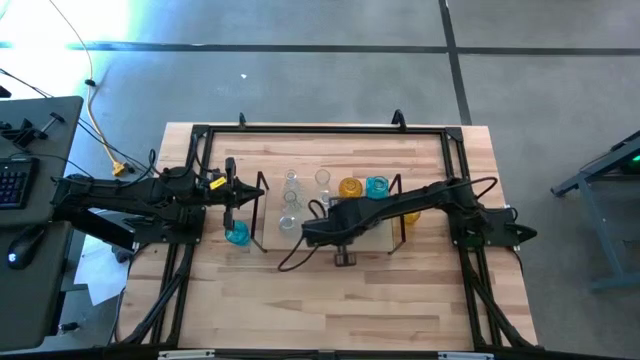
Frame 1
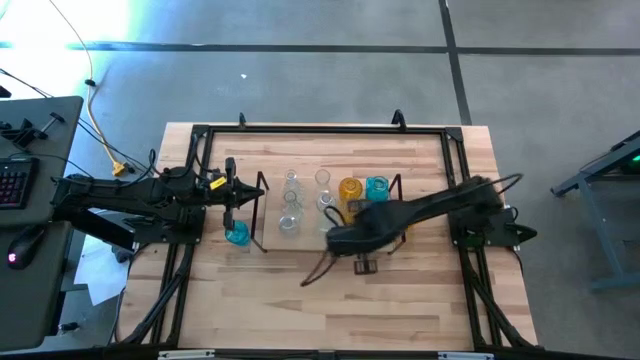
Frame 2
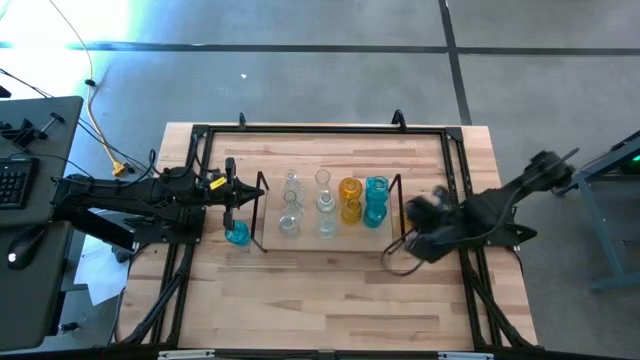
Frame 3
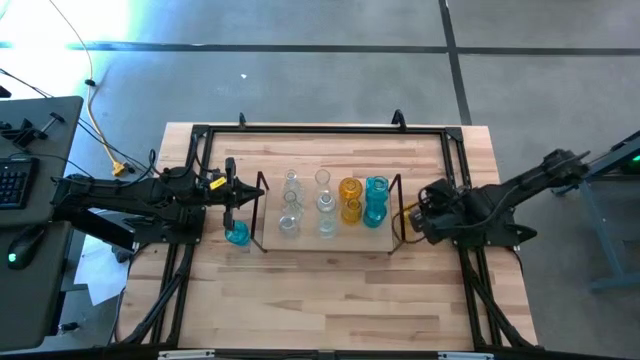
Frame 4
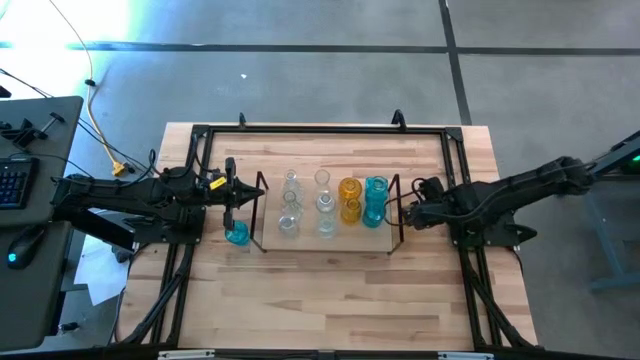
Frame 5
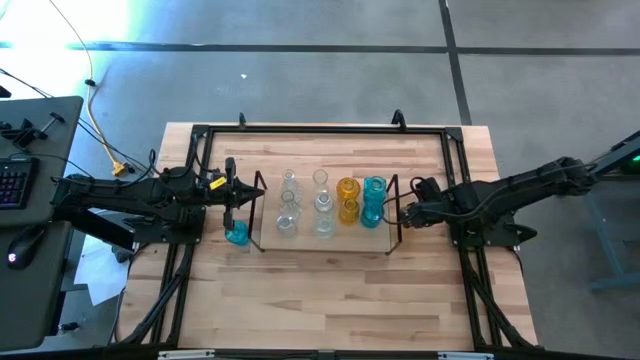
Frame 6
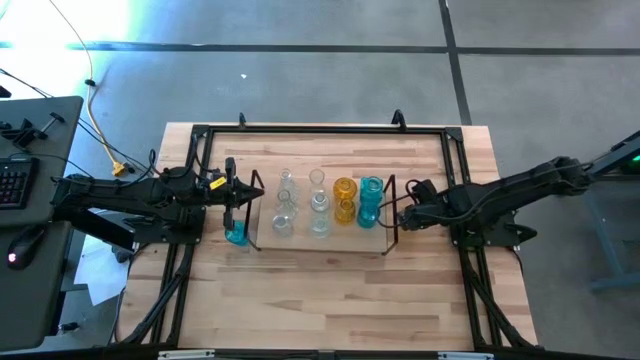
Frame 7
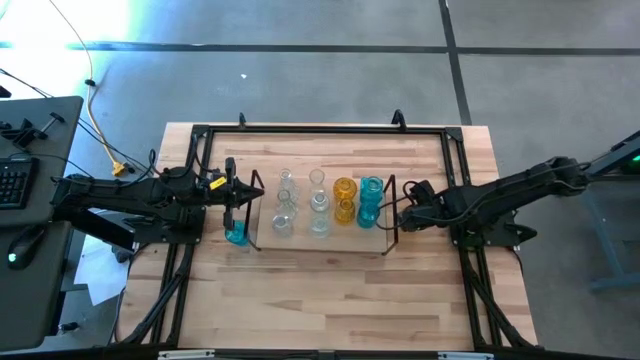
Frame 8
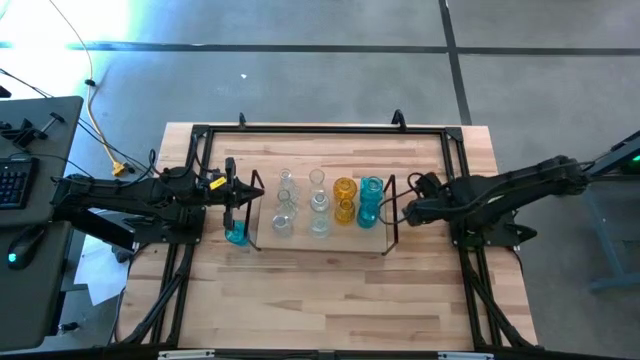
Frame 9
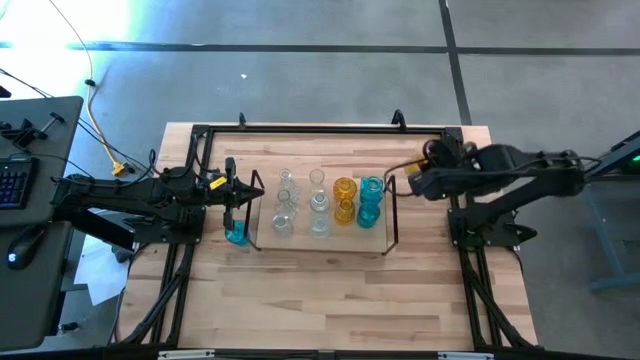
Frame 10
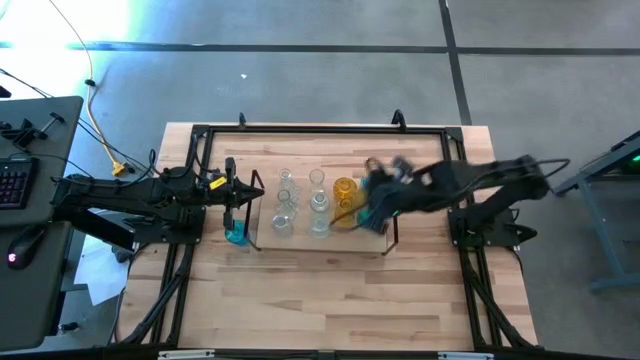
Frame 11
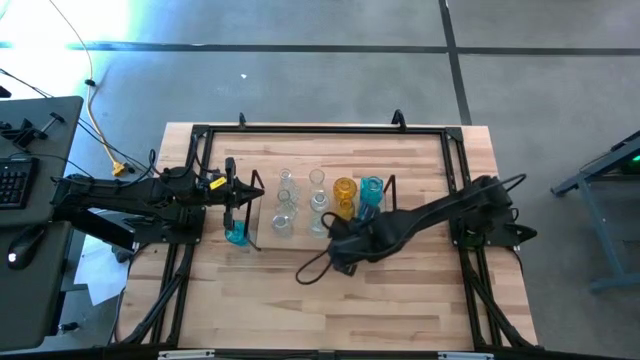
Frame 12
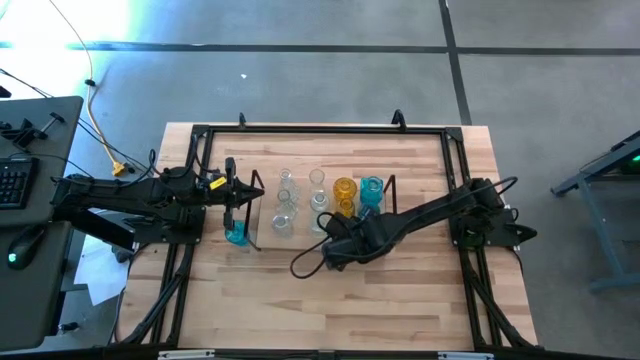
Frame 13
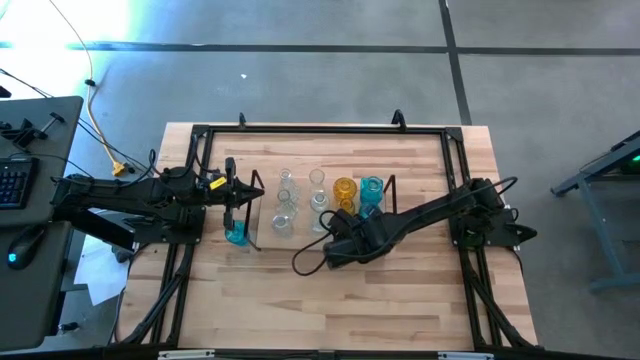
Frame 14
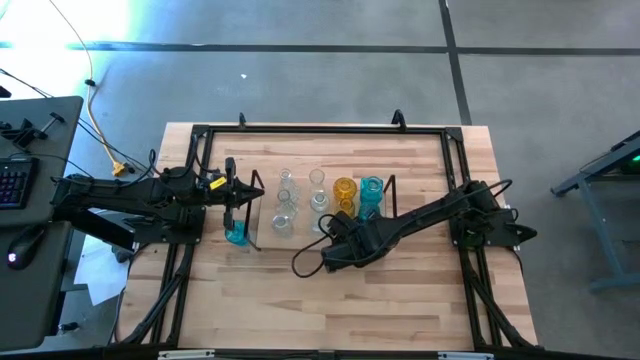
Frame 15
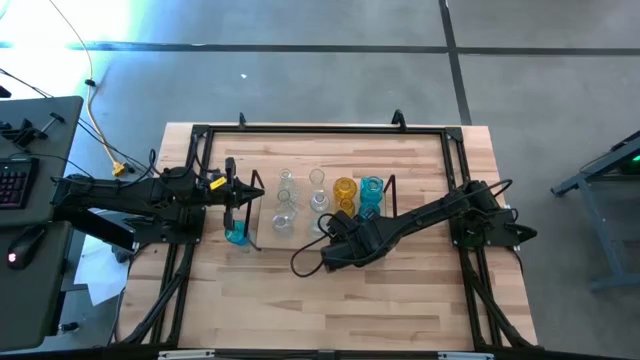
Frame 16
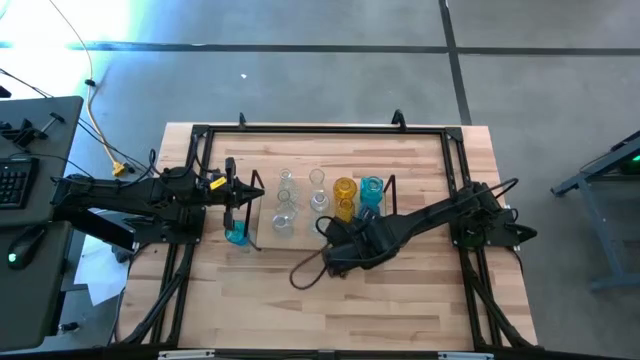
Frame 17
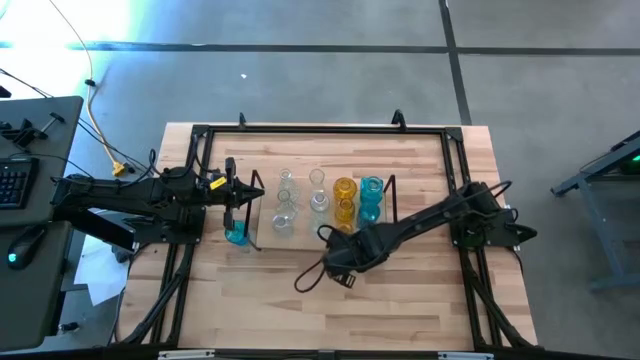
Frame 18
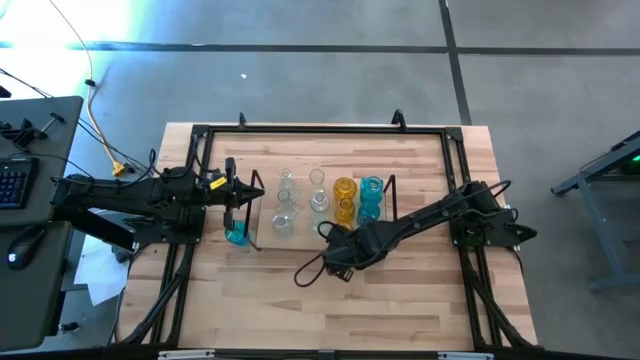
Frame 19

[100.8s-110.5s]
Task: sort vases onto shelf
Put the yellow vase on the shelf aligned with the other yellow vases

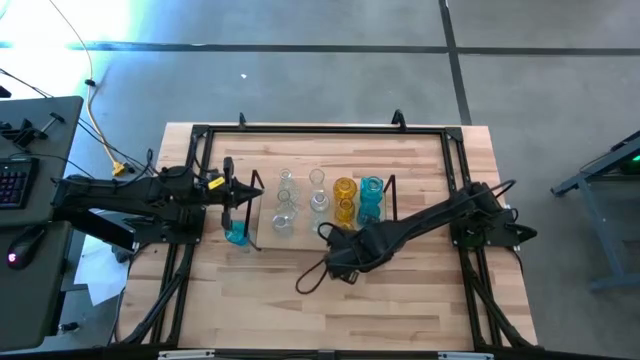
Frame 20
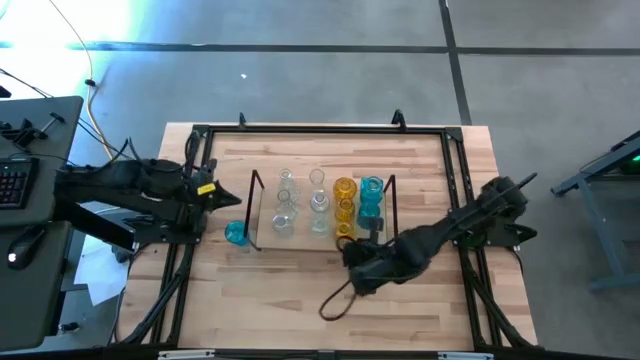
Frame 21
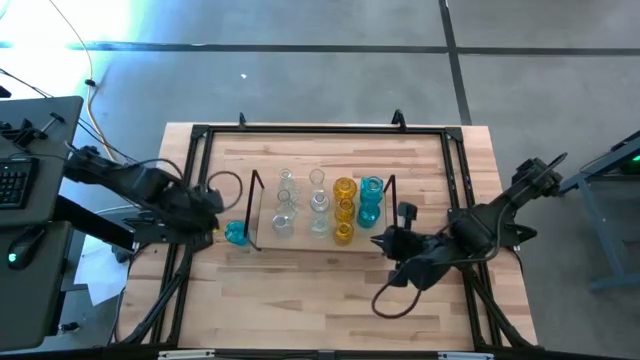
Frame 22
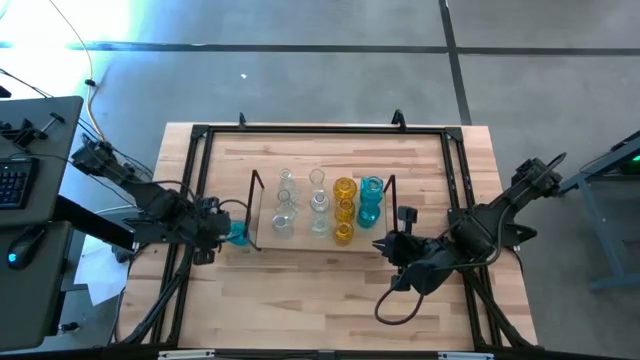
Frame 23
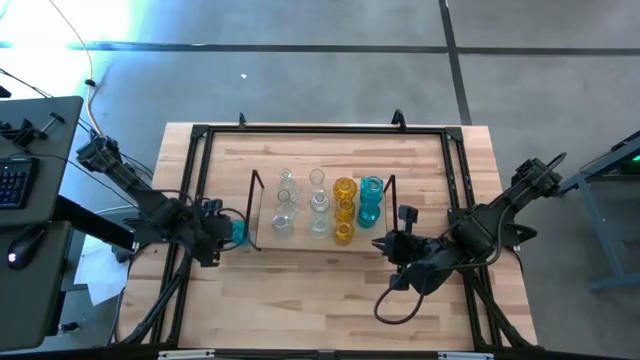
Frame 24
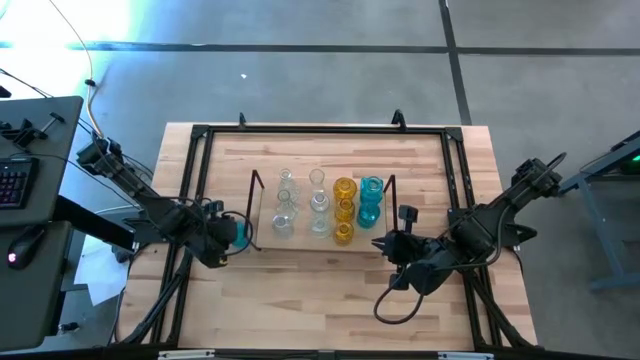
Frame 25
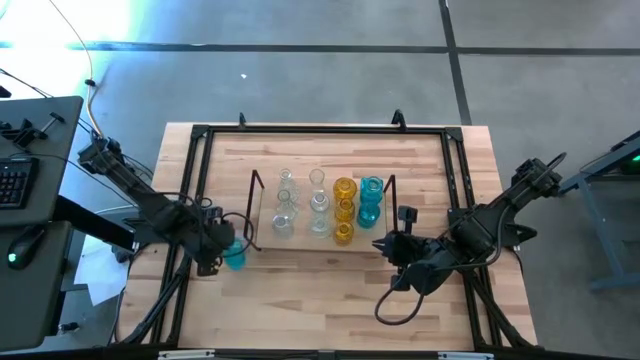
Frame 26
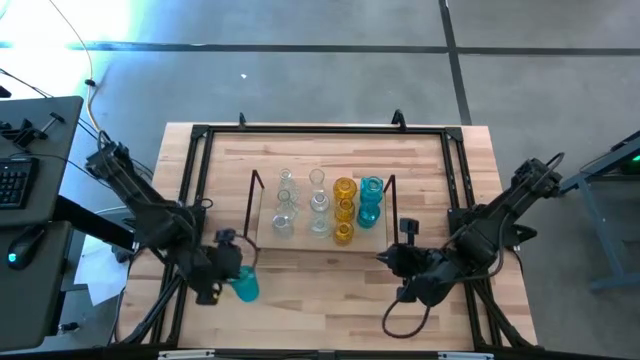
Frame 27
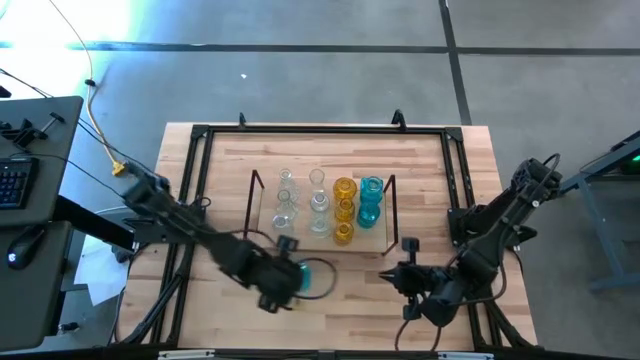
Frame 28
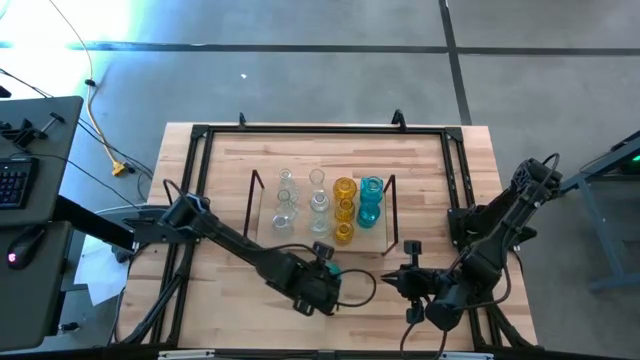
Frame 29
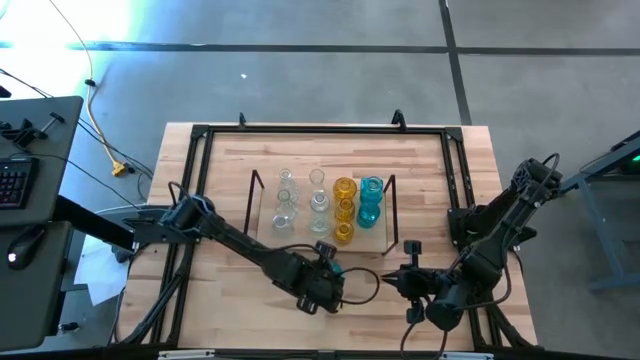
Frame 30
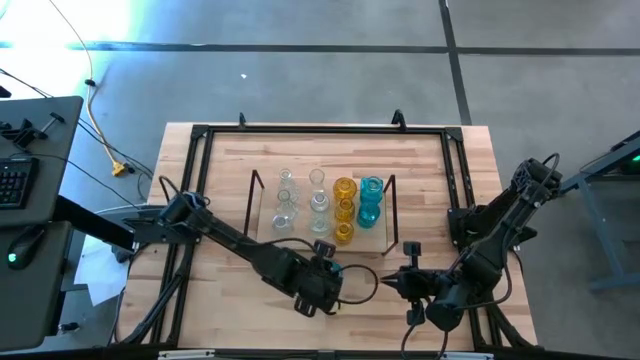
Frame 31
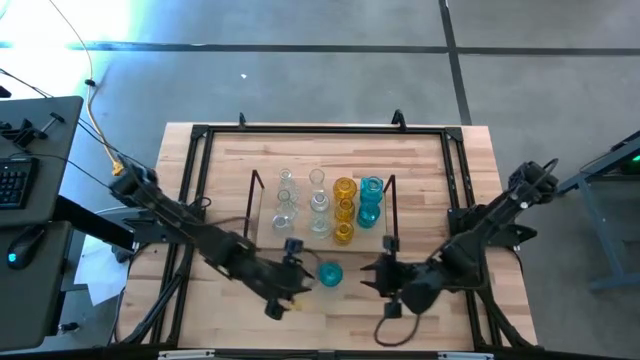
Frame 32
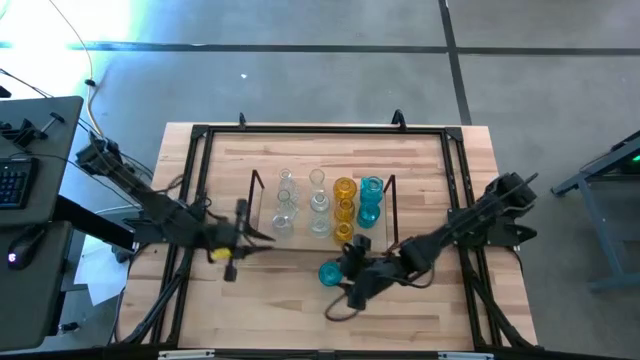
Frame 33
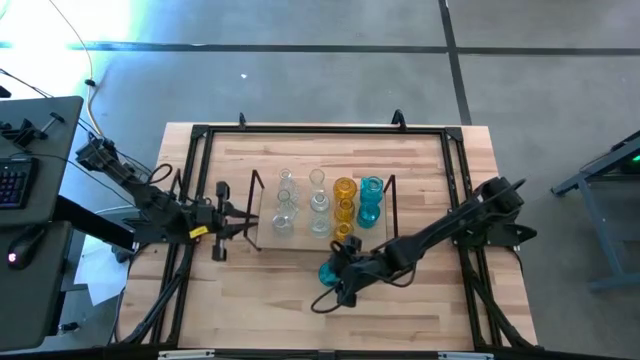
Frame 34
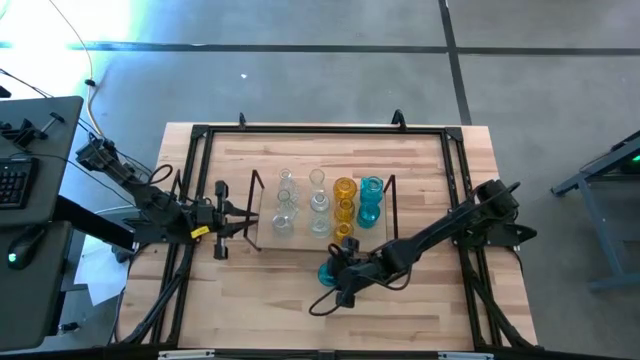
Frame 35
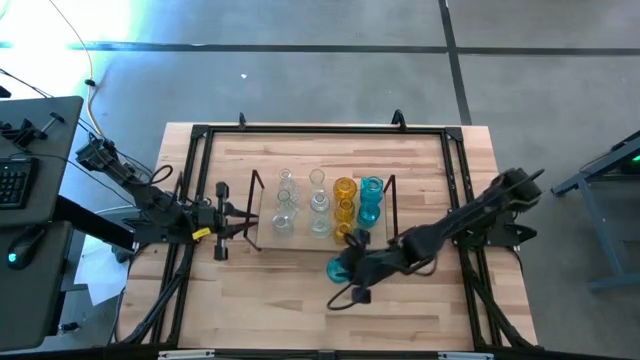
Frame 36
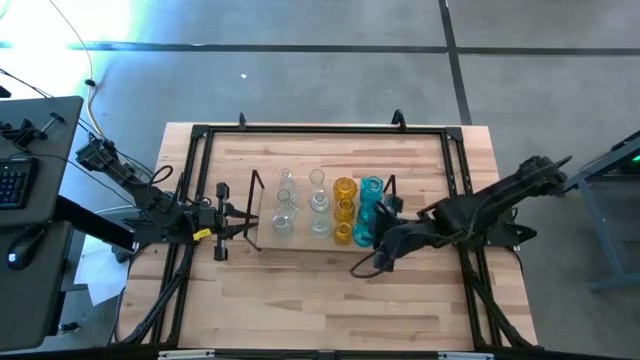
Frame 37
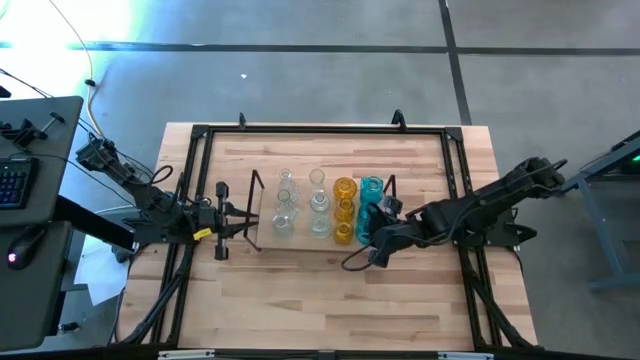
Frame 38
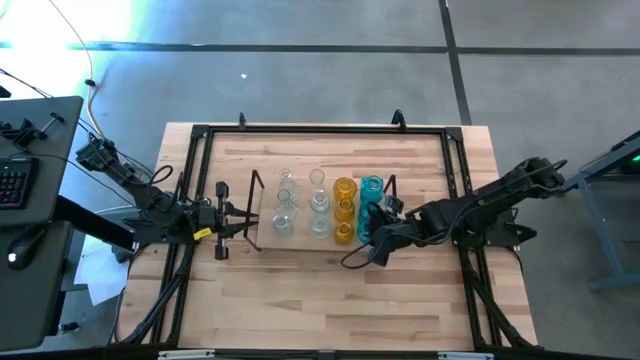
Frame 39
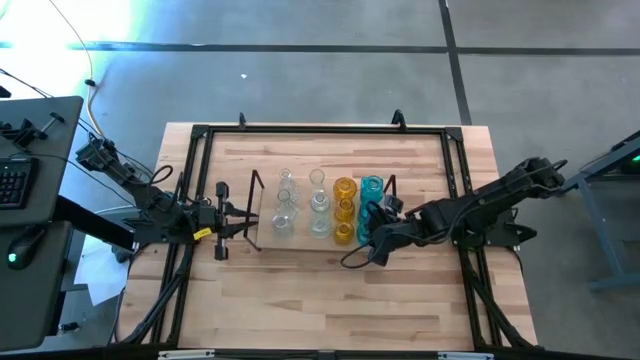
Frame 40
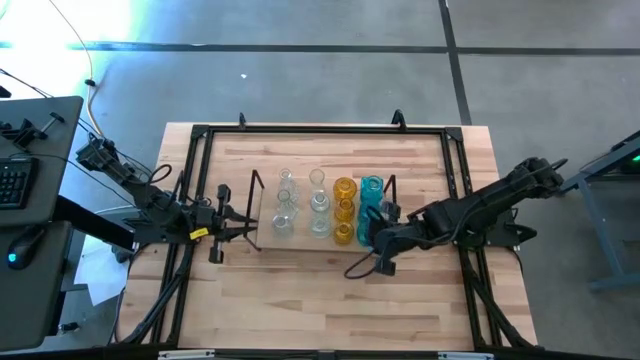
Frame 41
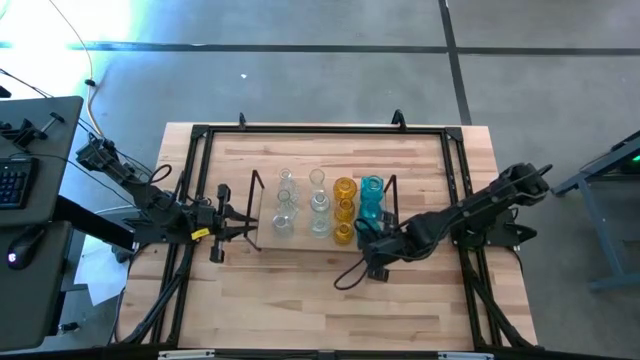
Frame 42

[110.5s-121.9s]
Put the blue vase on the shelf aligned with the other blue vases
